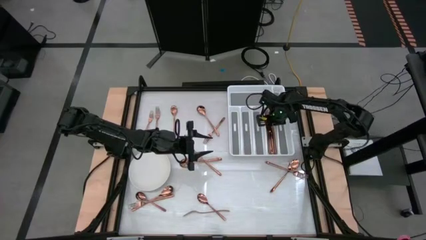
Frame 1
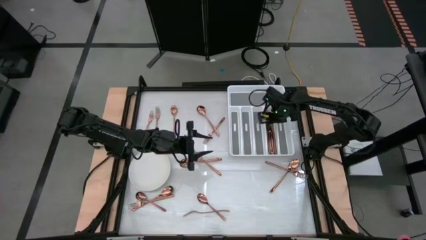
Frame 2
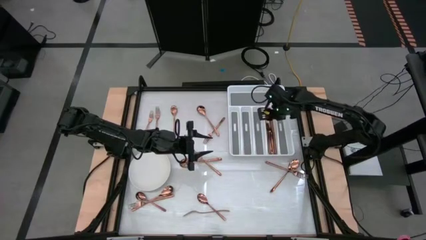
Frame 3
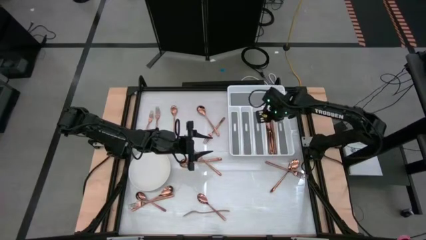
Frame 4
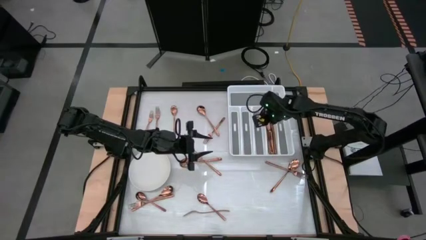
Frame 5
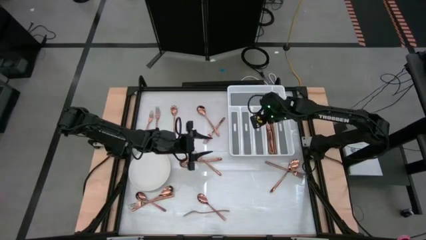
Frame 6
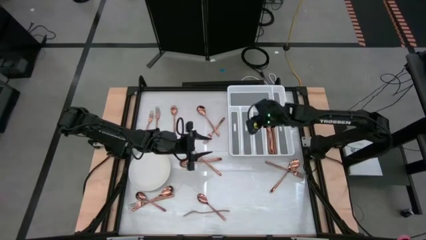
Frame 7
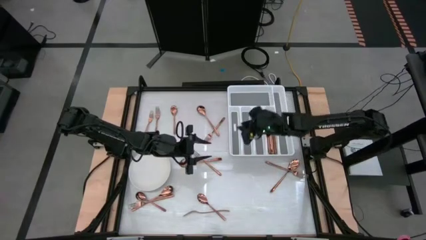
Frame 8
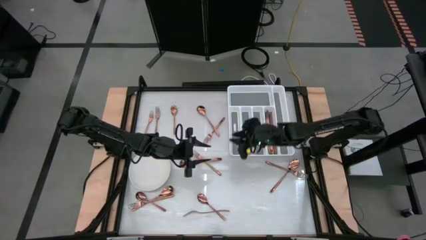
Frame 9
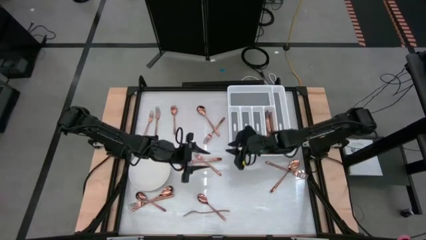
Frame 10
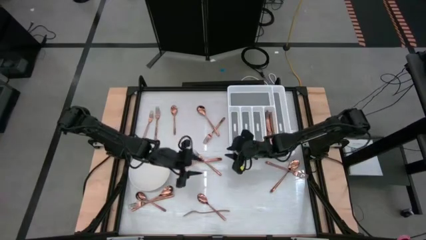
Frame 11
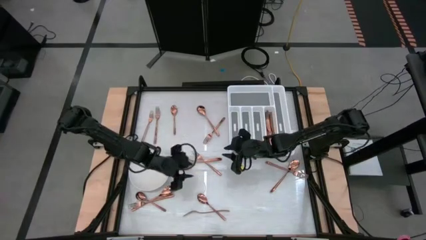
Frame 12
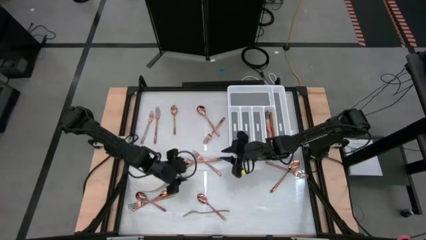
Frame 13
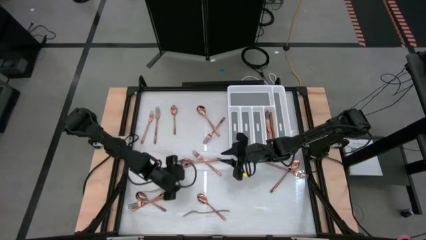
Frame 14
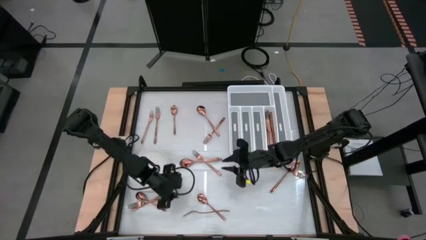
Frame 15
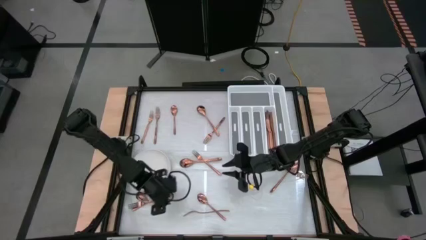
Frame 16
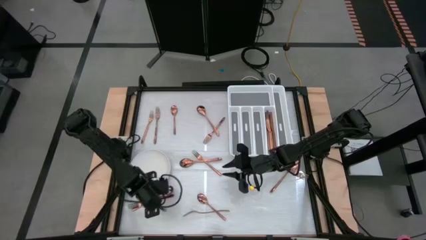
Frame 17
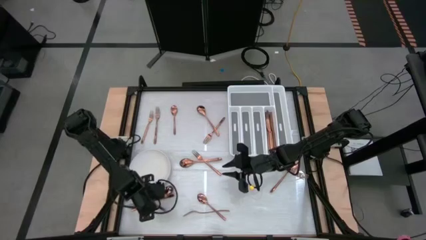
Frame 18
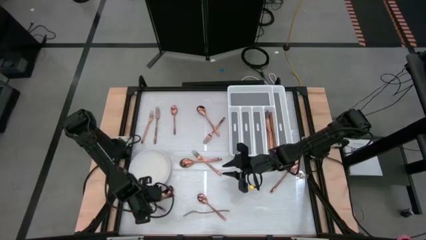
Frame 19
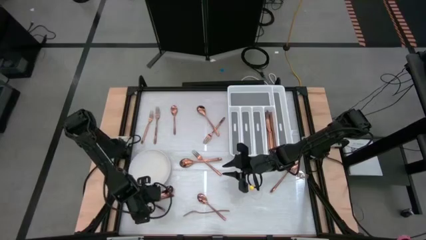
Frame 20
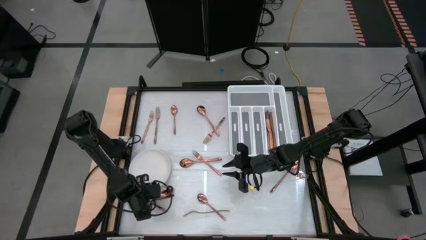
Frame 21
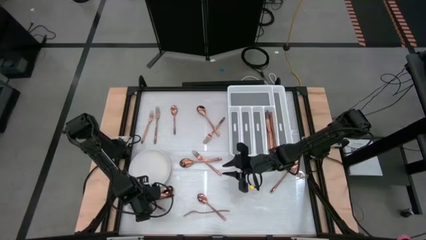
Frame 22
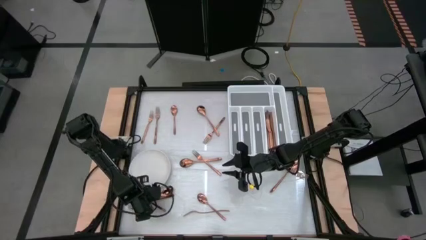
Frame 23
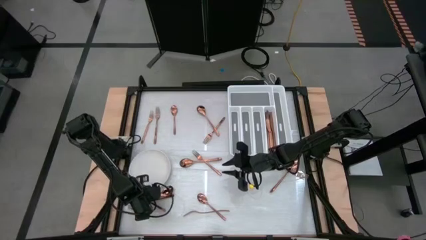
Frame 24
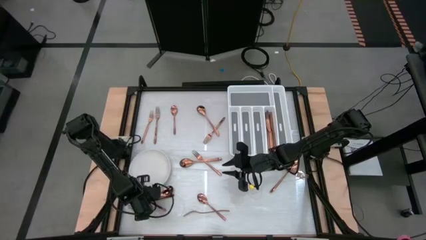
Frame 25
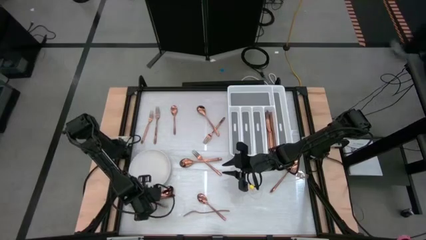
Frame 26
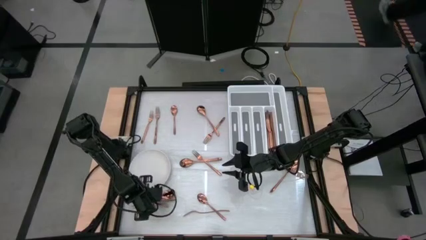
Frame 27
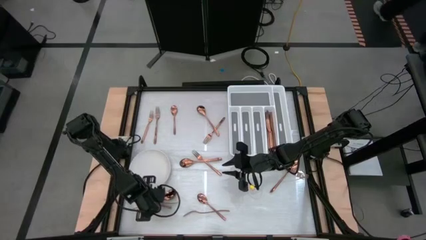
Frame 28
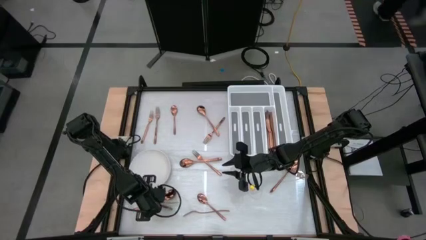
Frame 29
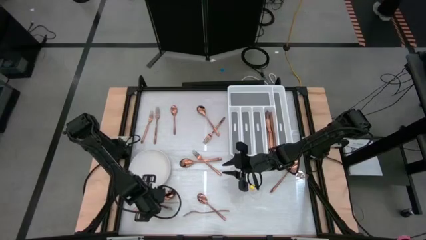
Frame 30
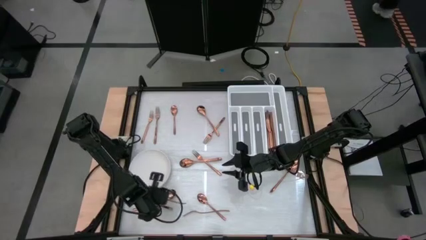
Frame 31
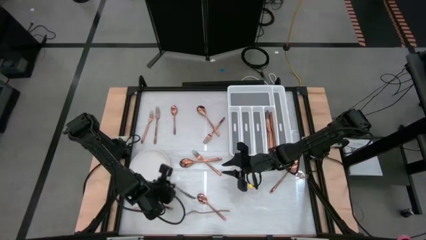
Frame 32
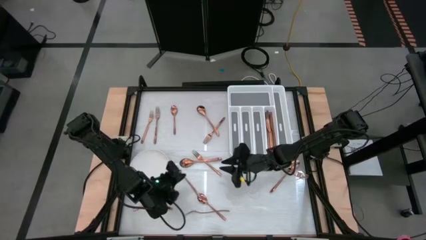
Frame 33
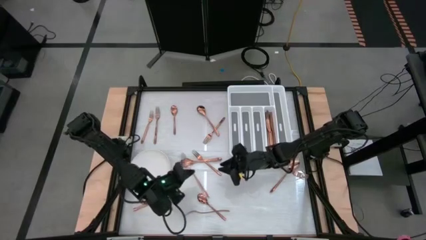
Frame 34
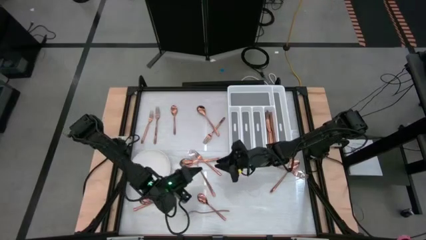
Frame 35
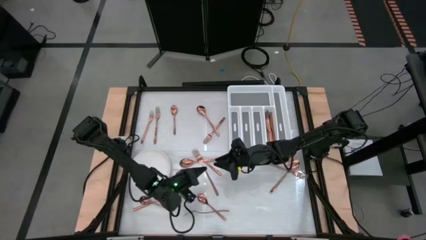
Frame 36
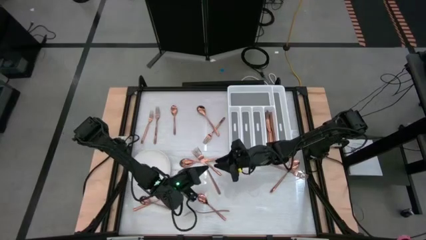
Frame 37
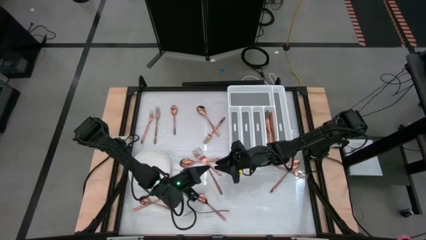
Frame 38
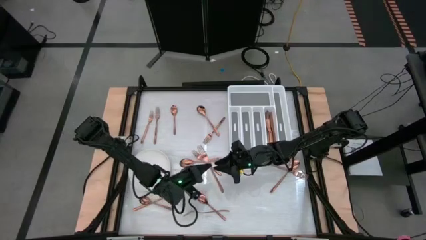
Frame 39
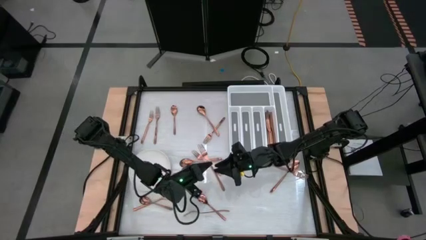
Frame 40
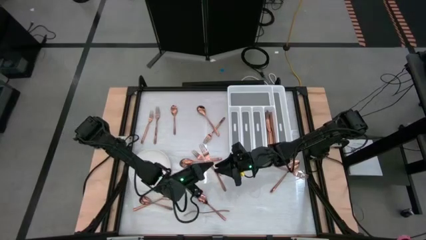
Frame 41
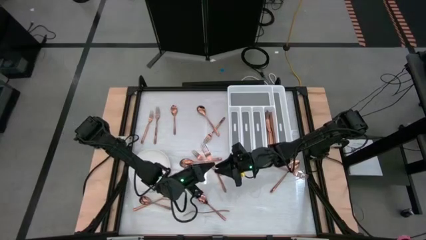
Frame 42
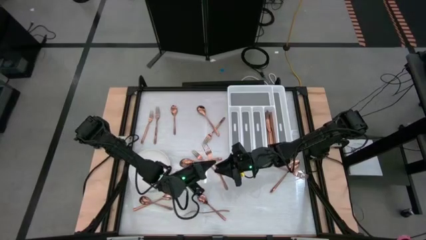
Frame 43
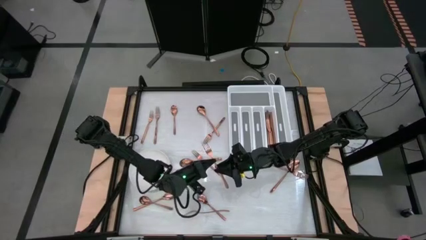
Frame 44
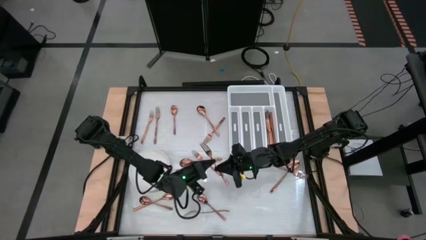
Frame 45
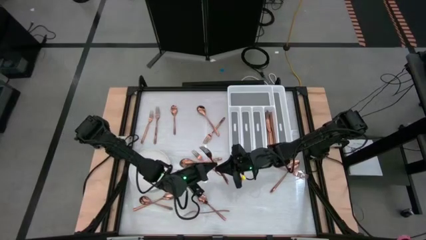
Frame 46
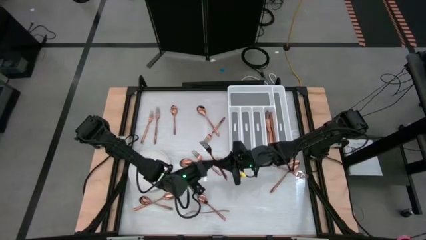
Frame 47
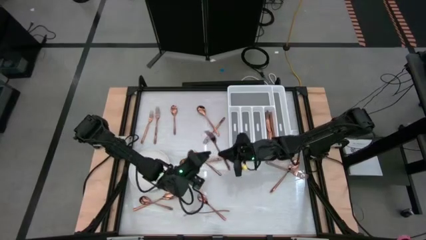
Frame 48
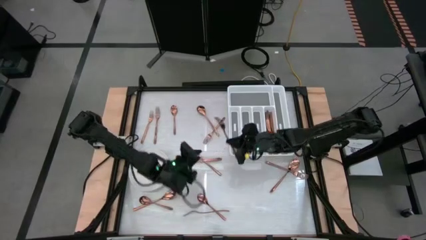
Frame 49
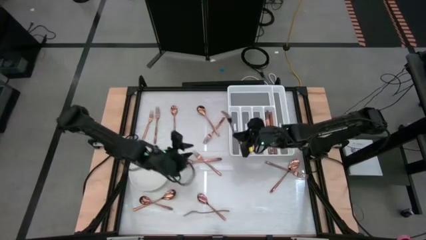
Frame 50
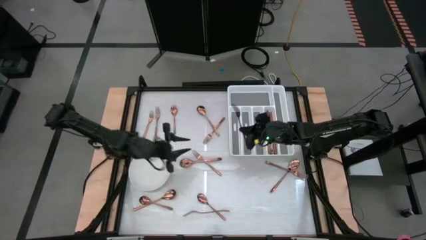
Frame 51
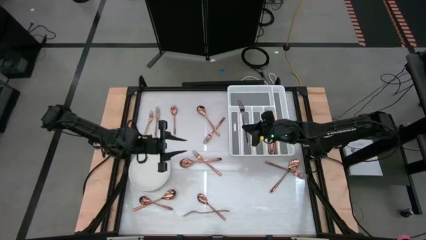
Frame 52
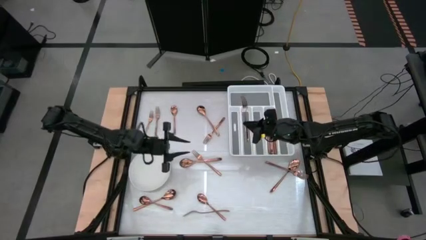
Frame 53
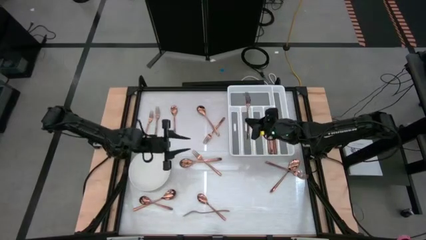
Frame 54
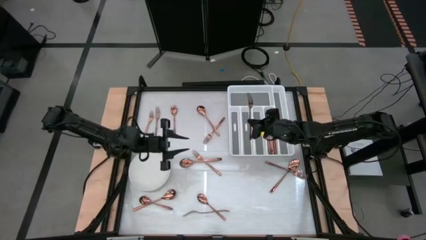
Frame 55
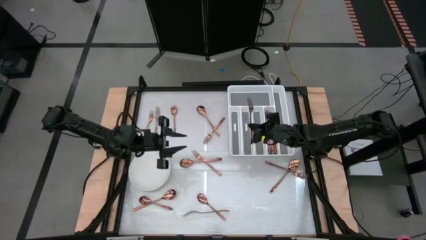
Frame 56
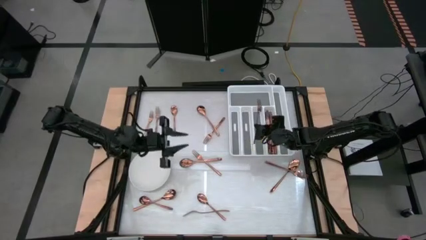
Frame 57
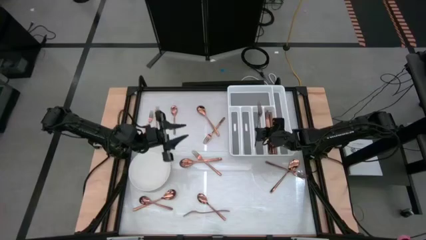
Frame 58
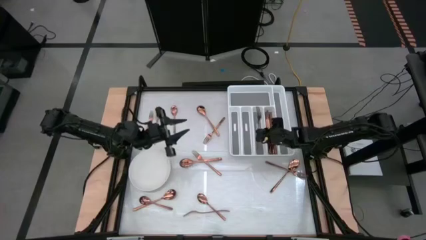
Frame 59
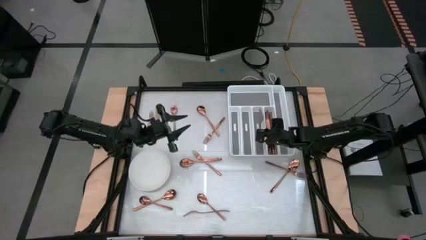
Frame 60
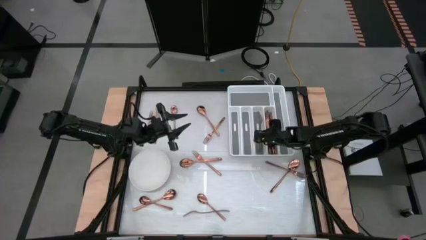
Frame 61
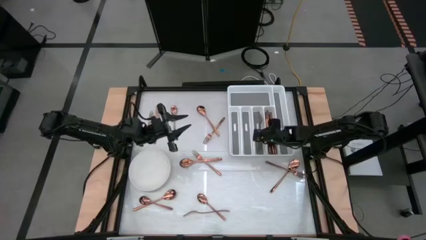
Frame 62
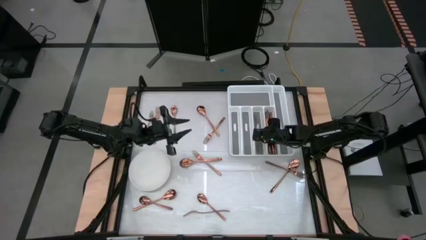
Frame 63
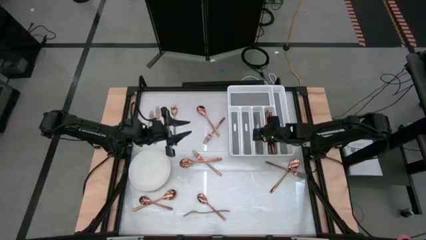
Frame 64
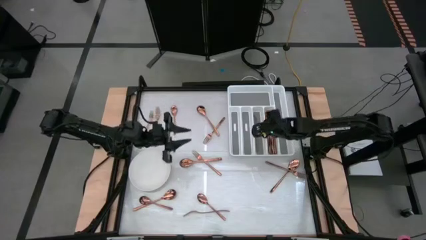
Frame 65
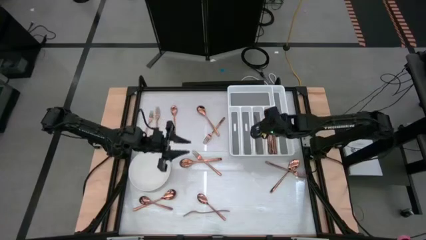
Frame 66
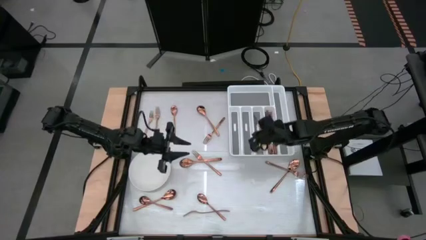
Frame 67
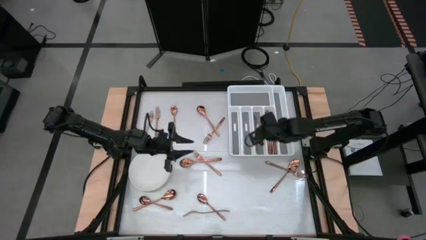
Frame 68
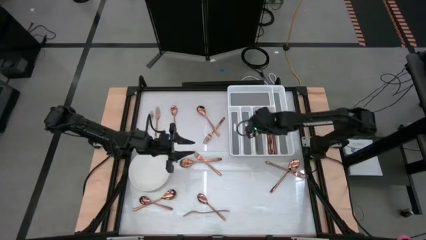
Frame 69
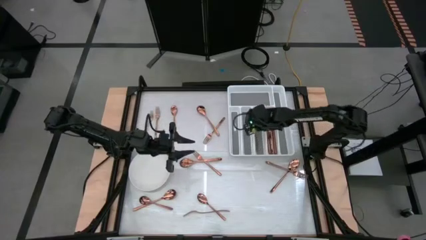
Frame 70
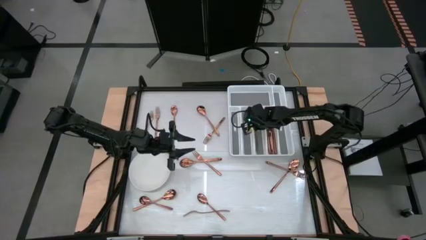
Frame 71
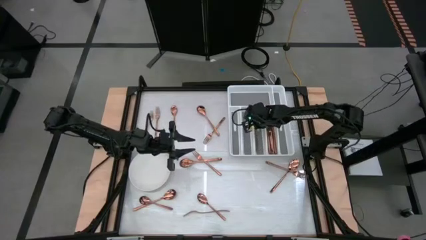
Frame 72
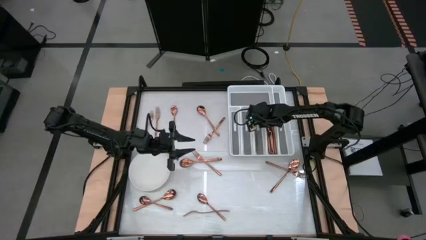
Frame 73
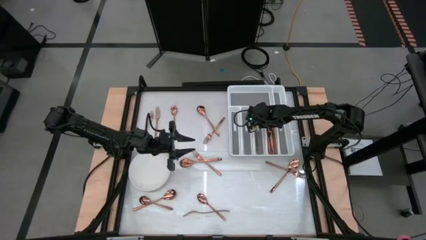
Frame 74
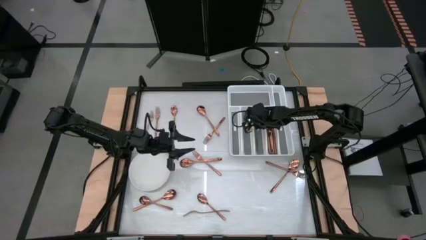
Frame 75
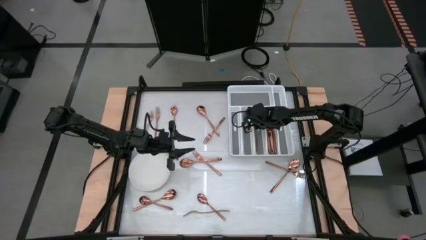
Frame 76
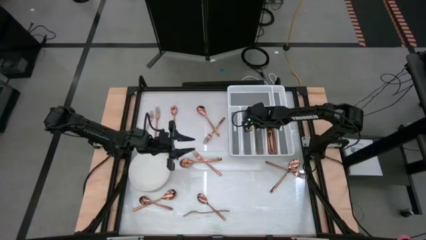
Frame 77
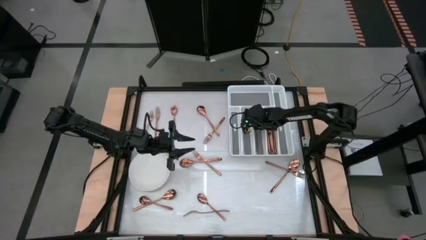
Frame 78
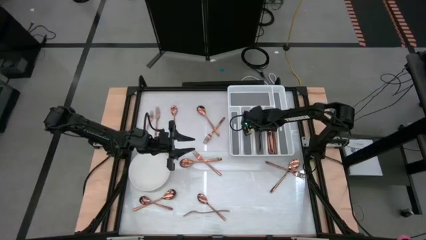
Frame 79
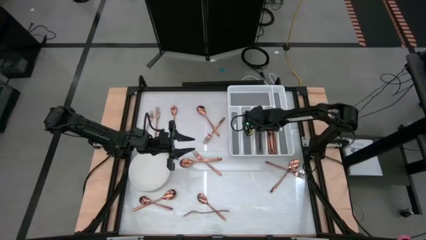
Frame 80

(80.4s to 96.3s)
Task: Sort silverware
Put the bronze fork into the silverware tray
